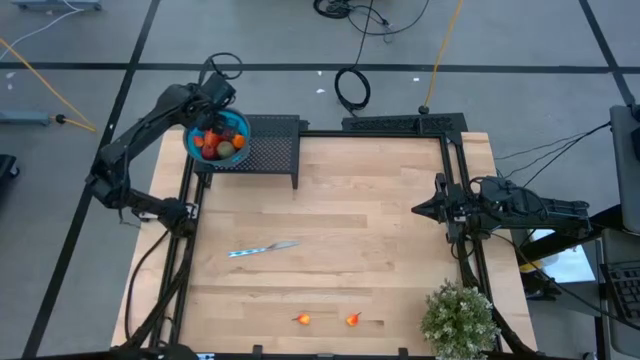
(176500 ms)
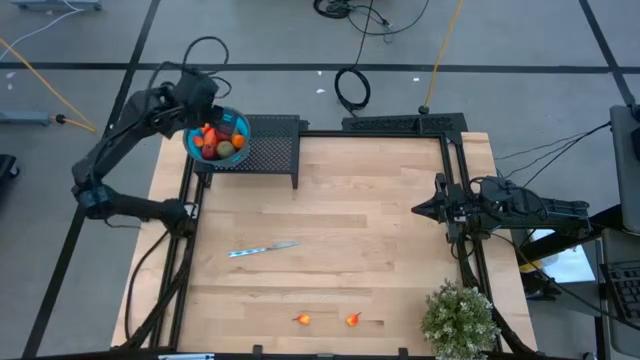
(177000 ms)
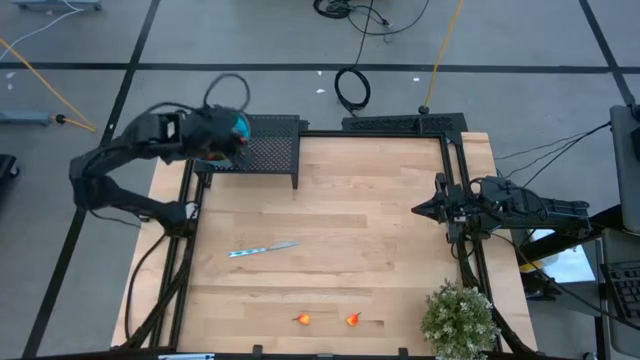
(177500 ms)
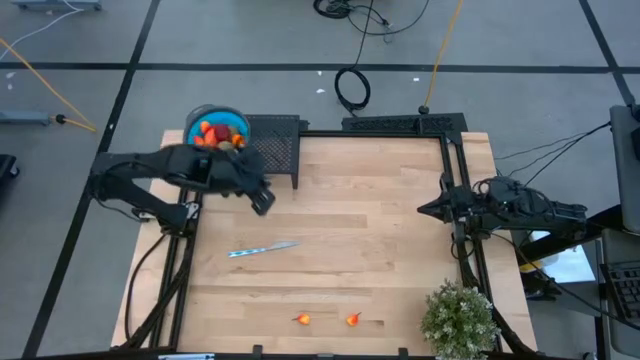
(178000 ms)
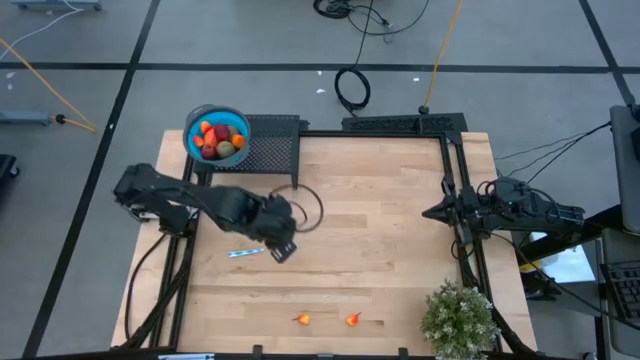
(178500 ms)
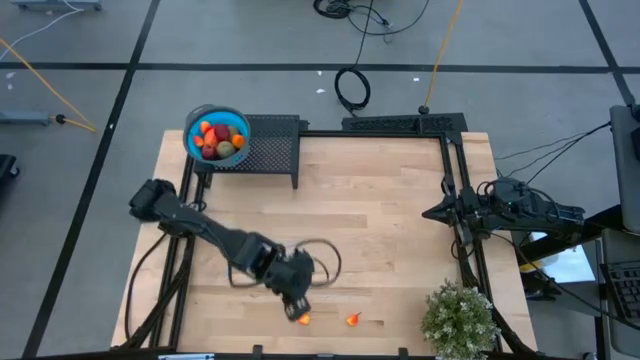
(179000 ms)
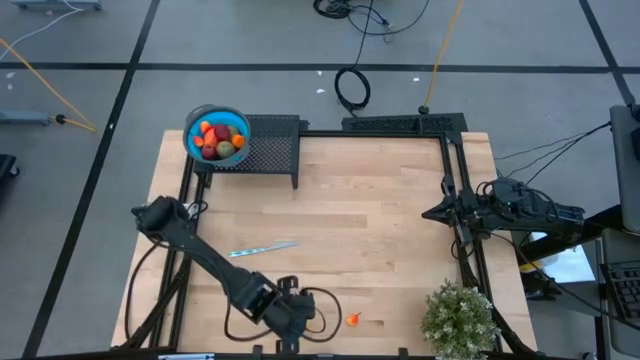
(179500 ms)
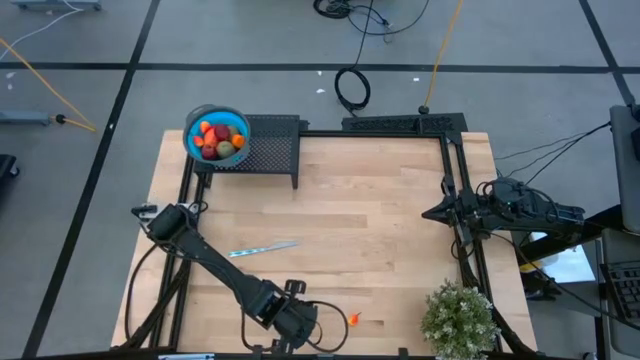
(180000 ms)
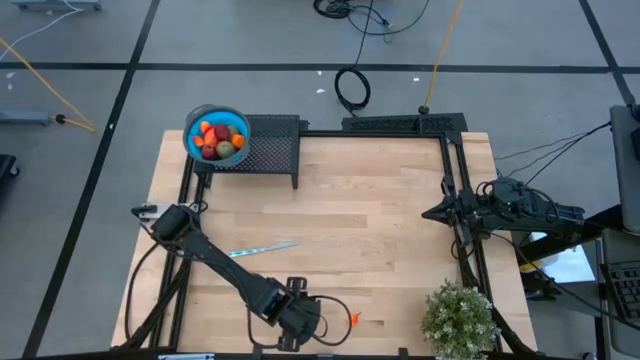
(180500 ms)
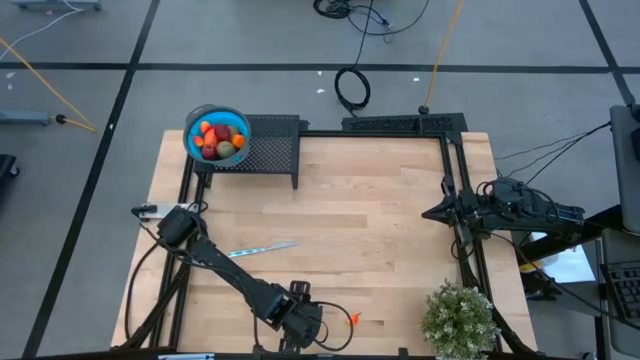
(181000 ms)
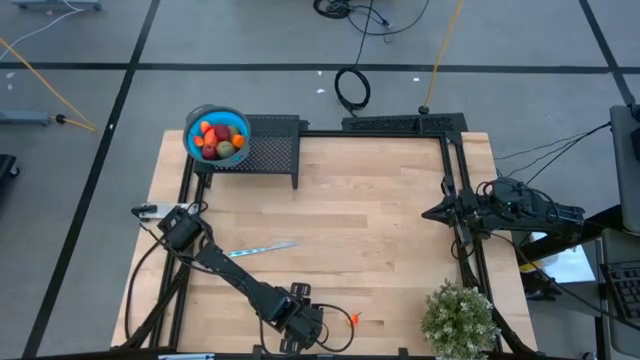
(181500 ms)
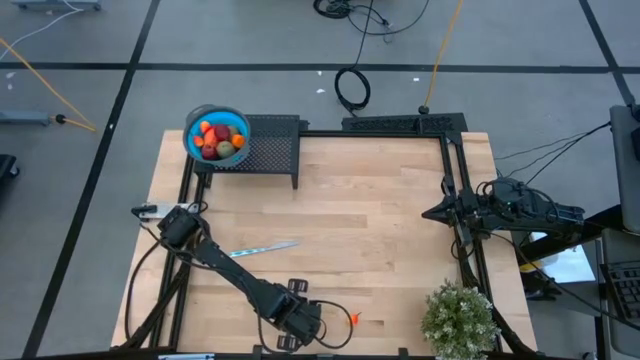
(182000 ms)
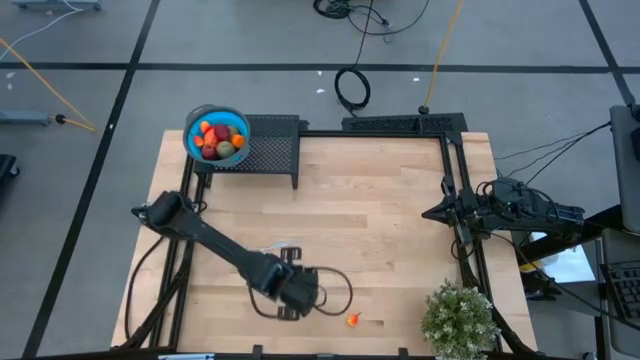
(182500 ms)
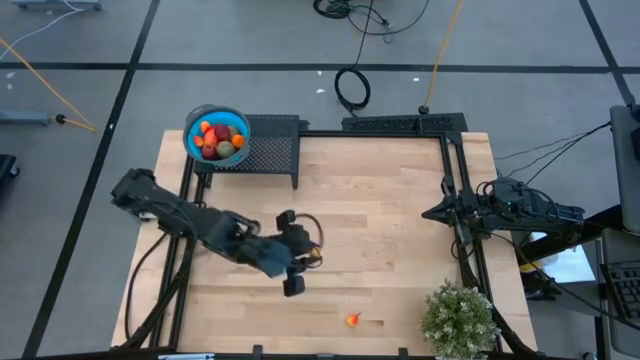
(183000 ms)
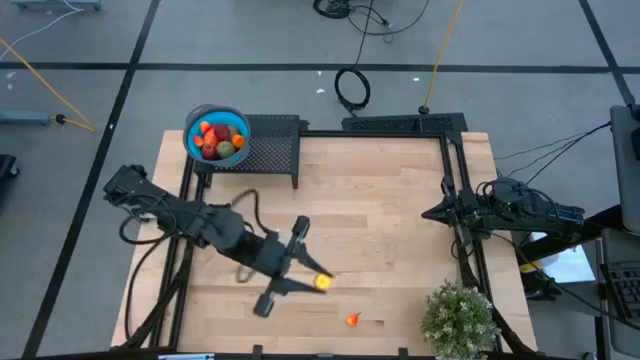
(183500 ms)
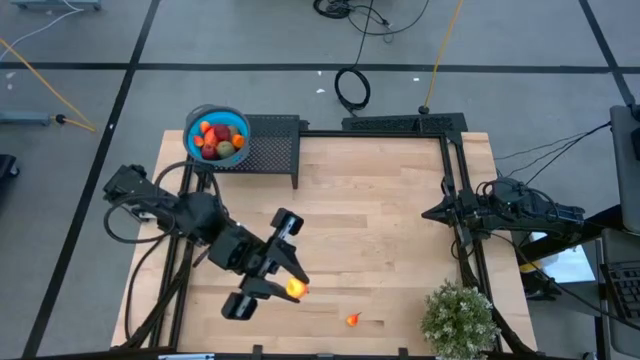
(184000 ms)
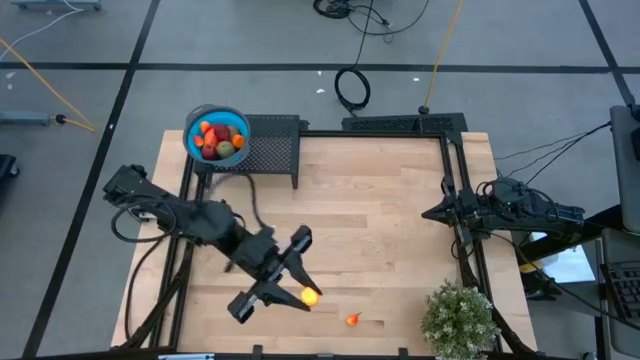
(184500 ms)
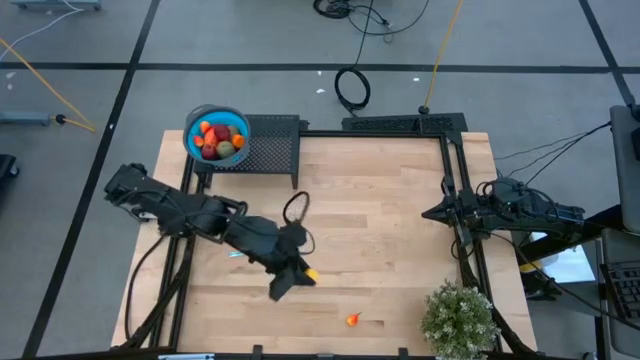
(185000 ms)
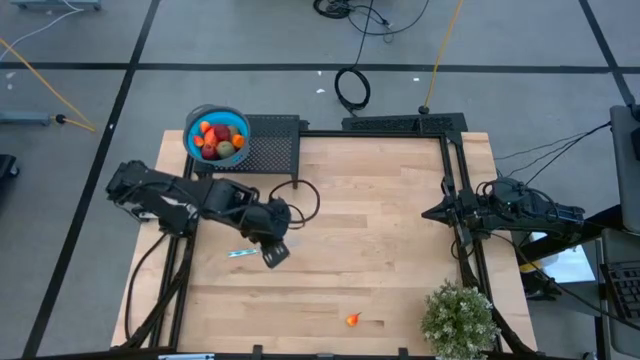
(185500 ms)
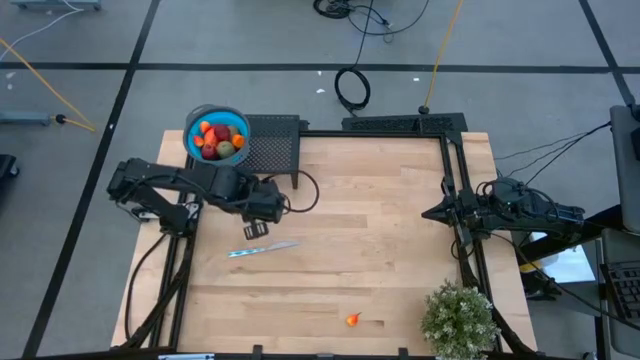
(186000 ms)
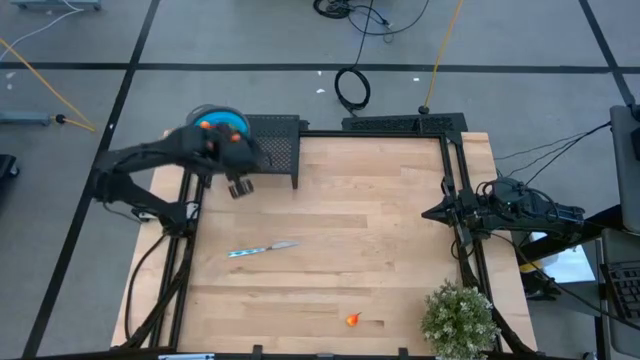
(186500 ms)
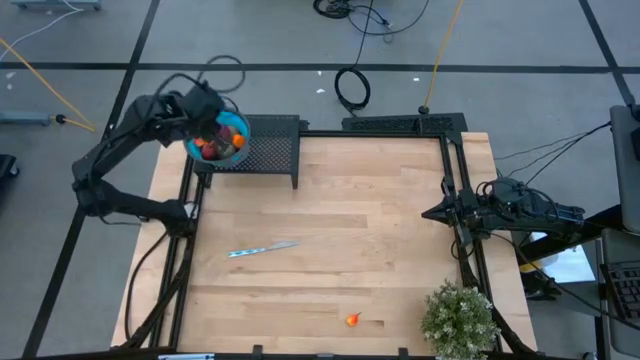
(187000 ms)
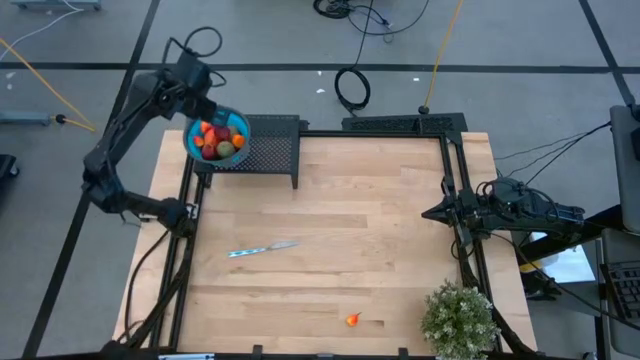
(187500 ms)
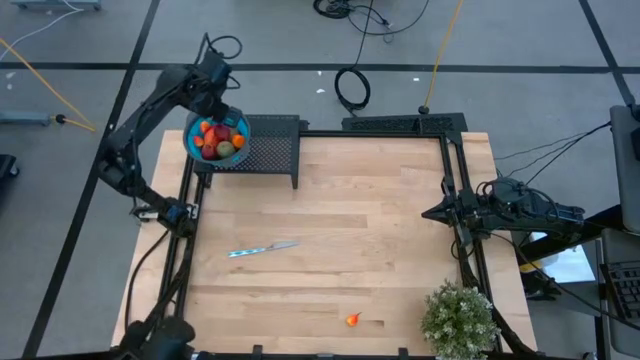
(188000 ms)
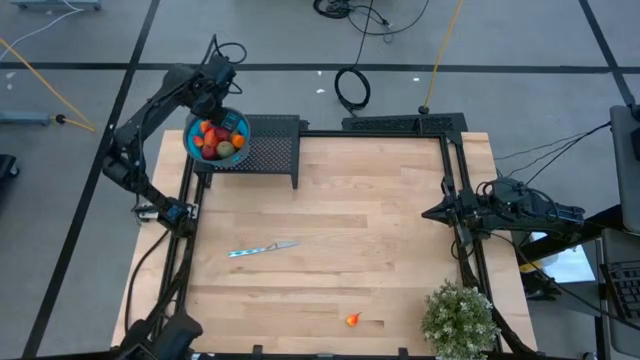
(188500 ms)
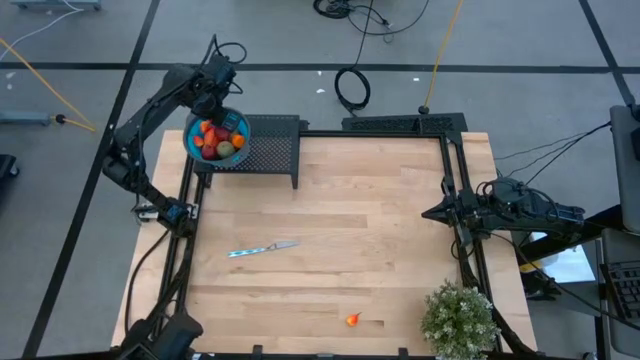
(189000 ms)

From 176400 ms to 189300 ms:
Task: Pick & Place Fruit
Put the peach into the blue strainer bowl on the shelf

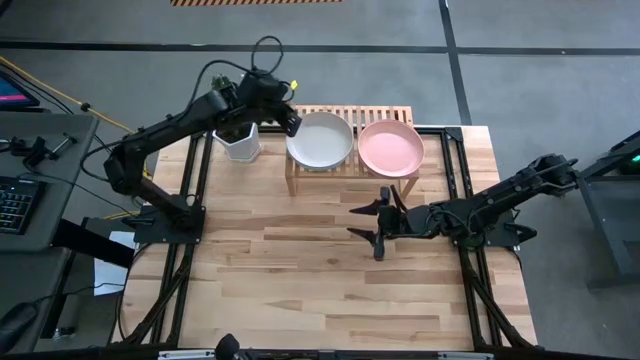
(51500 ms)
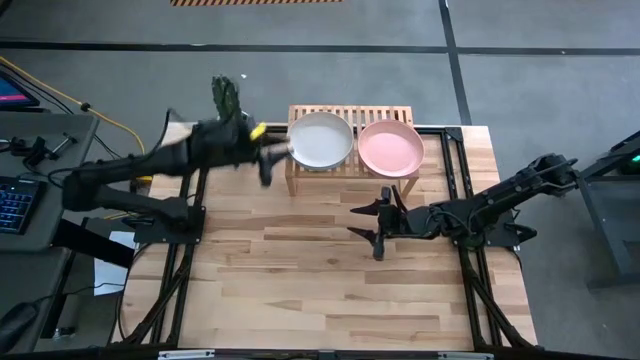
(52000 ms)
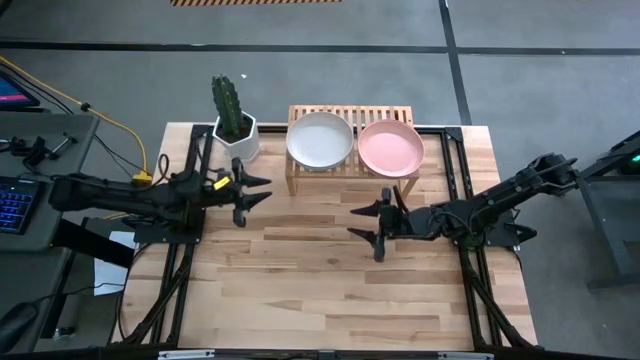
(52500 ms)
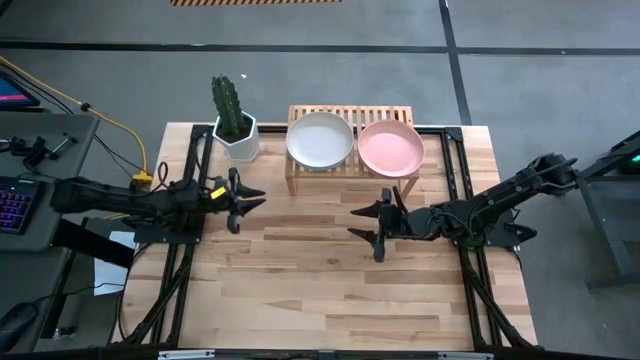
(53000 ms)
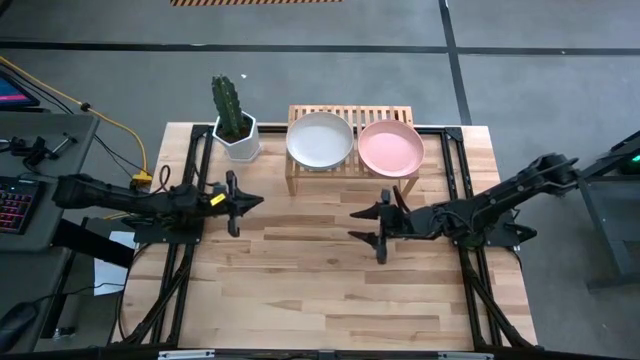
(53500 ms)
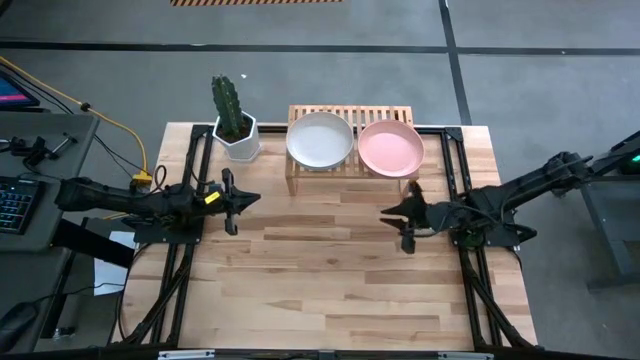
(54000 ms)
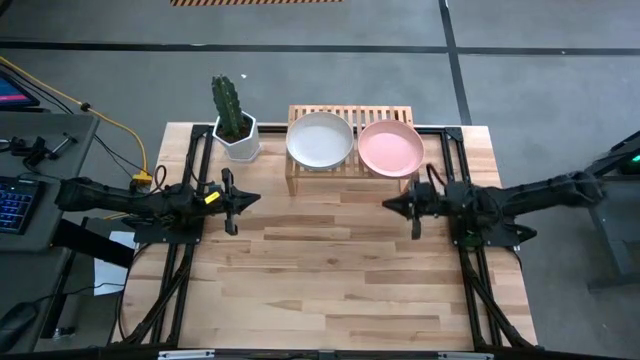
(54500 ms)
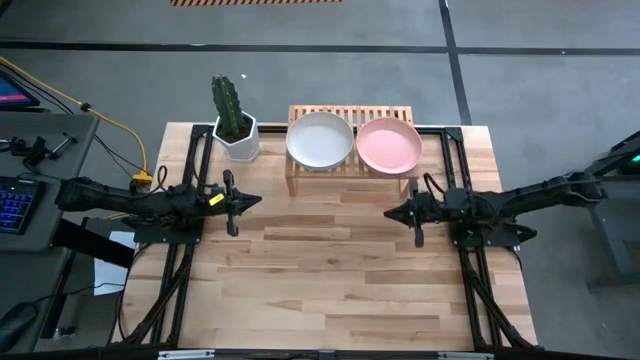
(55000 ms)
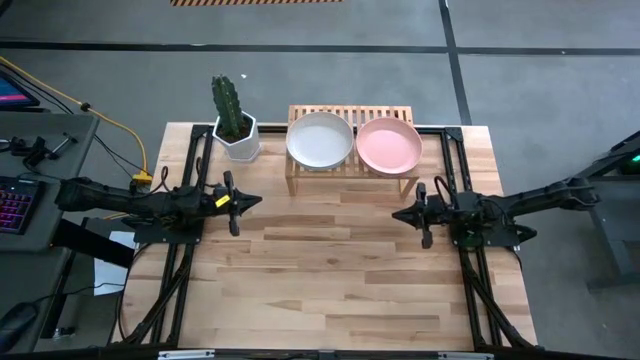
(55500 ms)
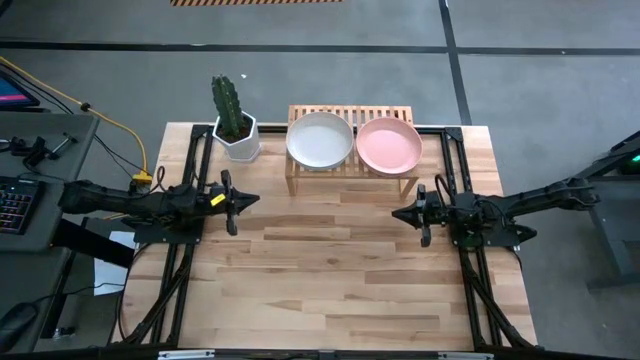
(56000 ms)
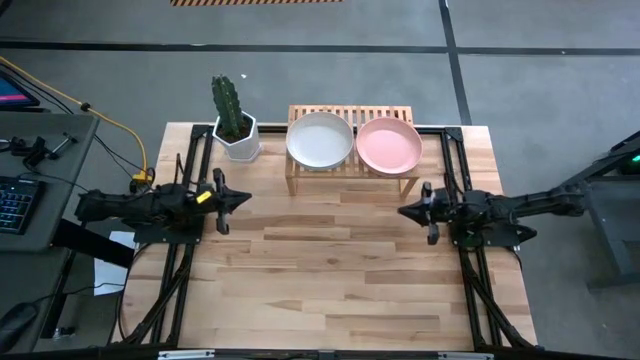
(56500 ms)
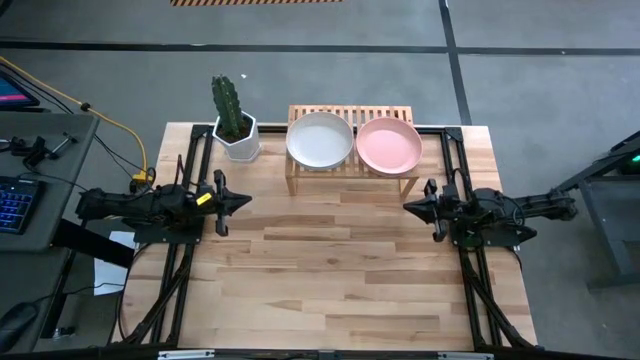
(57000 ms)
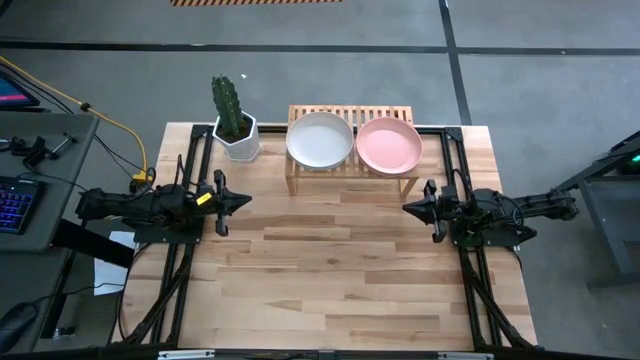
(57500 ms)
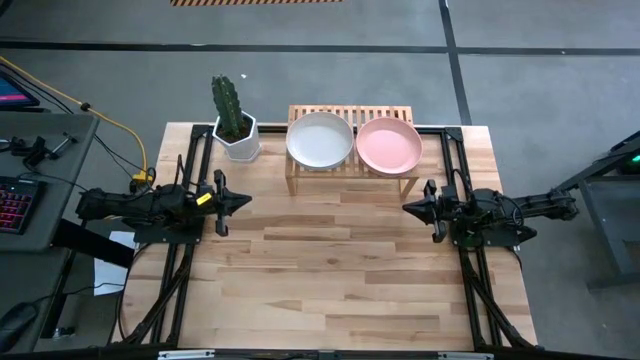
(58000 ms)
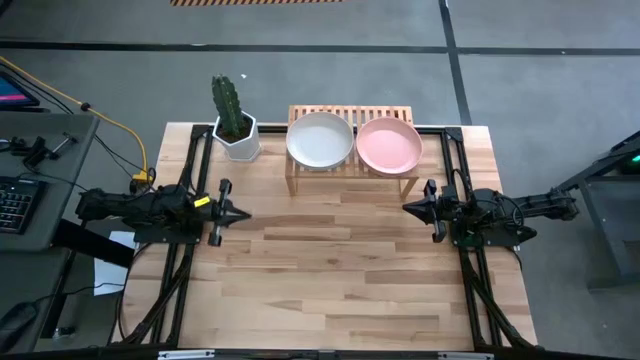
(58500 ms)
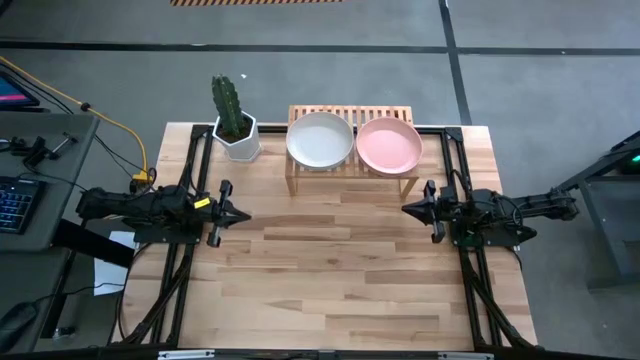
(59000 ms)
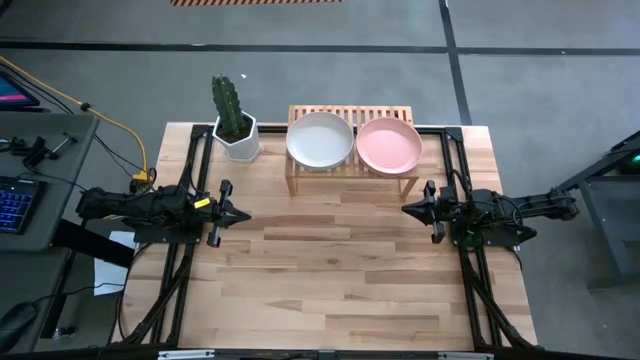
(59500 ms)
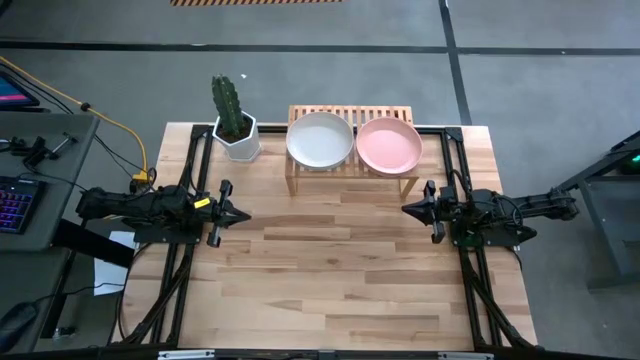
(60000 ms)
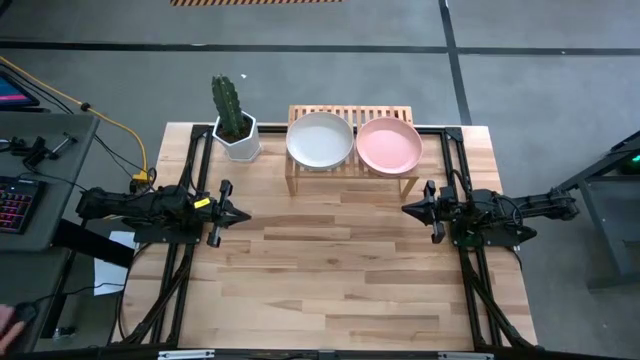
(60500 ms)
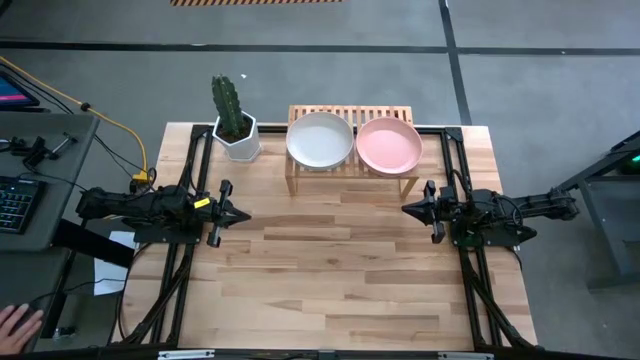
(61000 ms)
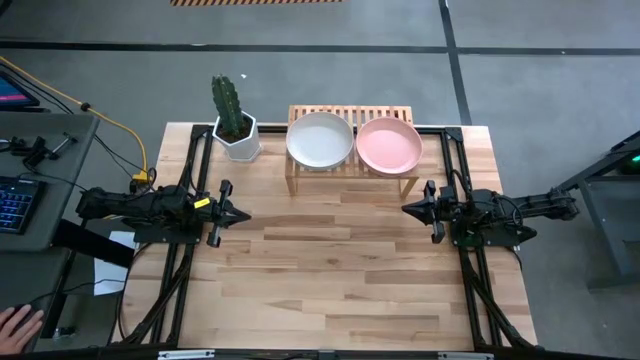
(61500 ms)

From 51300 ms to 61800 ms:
Task: Place and stack plates onto a shelf
Return to Home Position
